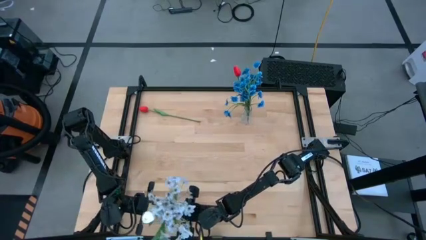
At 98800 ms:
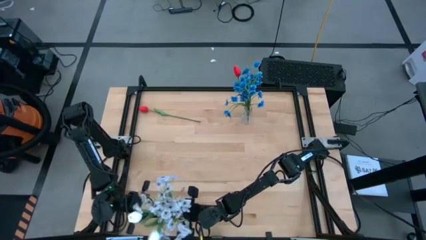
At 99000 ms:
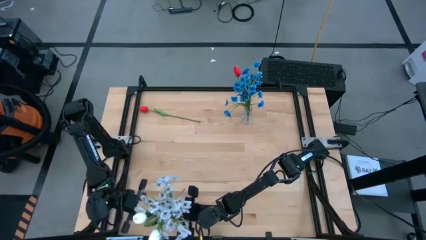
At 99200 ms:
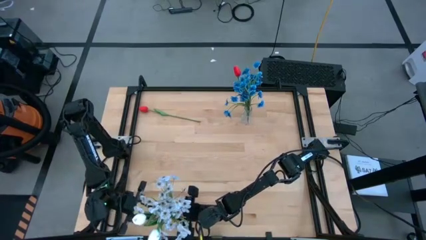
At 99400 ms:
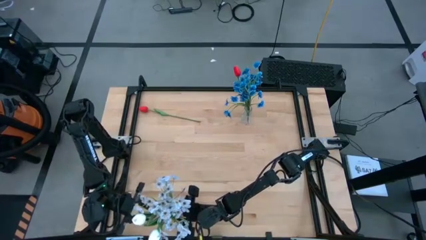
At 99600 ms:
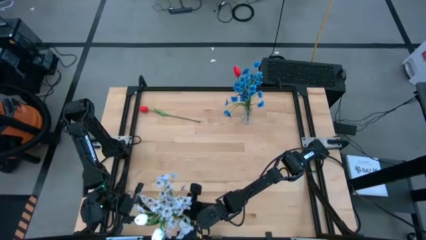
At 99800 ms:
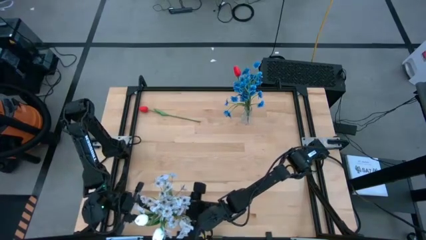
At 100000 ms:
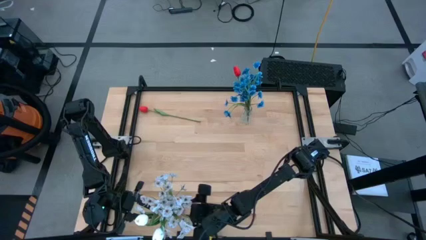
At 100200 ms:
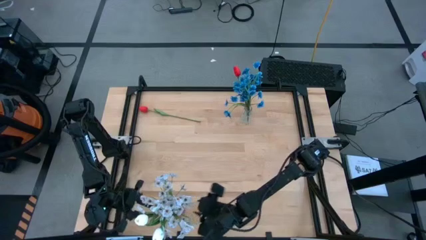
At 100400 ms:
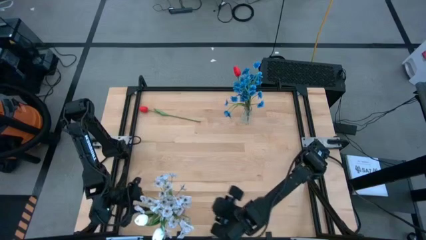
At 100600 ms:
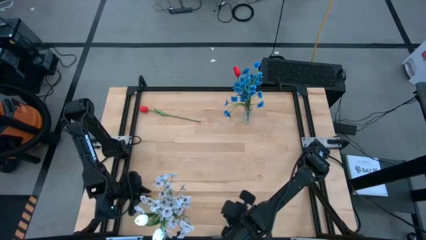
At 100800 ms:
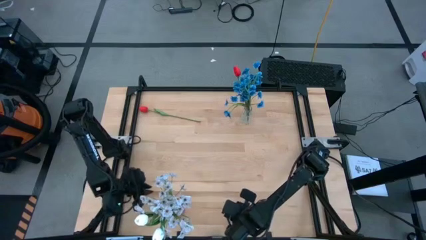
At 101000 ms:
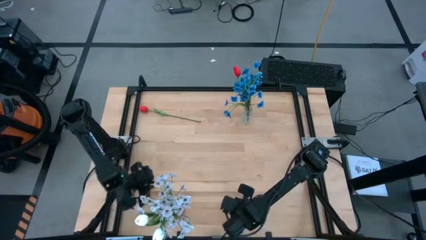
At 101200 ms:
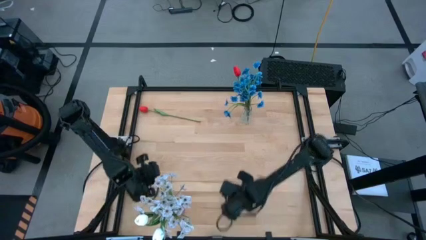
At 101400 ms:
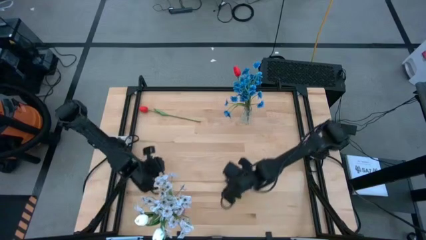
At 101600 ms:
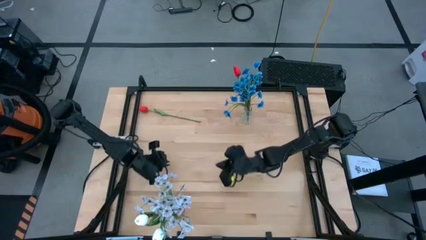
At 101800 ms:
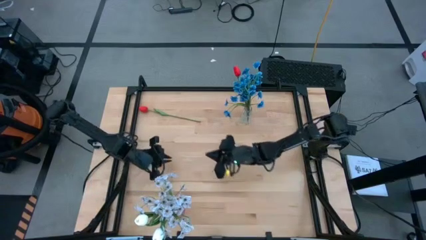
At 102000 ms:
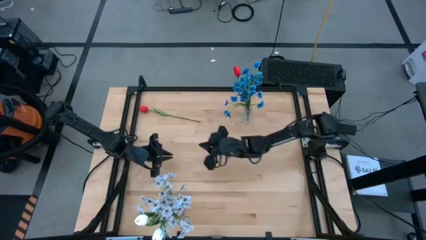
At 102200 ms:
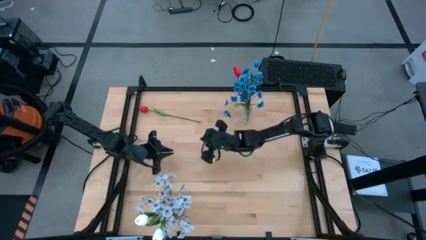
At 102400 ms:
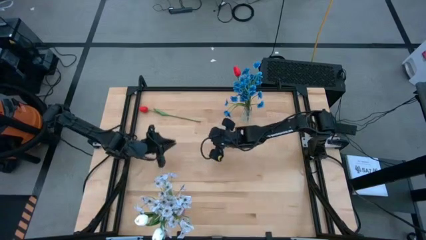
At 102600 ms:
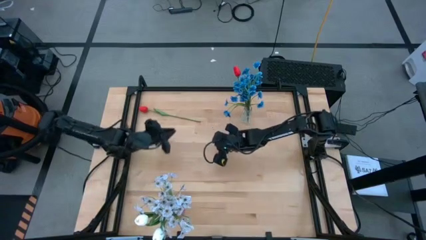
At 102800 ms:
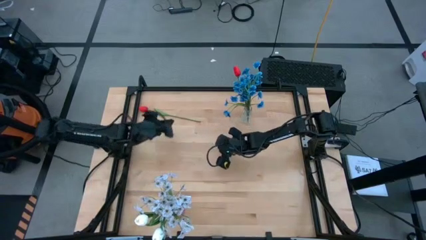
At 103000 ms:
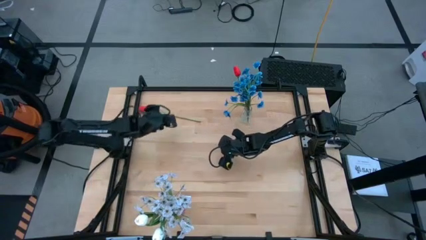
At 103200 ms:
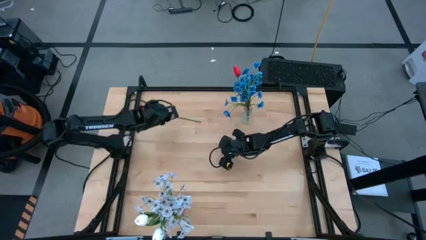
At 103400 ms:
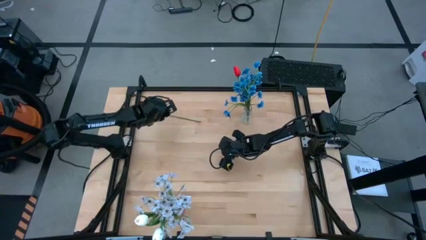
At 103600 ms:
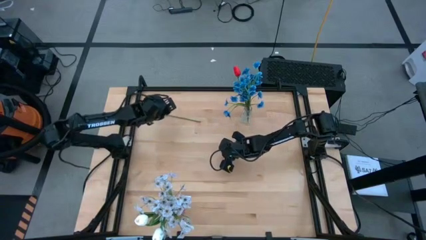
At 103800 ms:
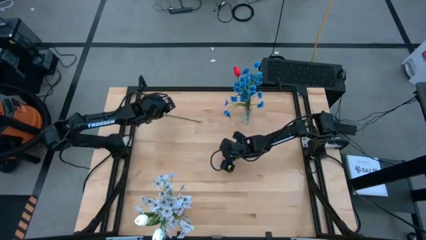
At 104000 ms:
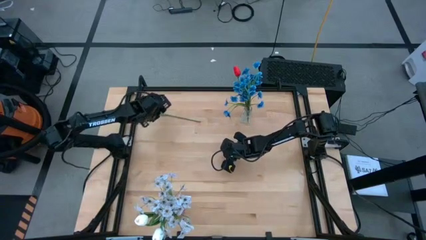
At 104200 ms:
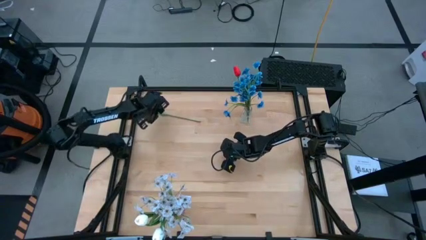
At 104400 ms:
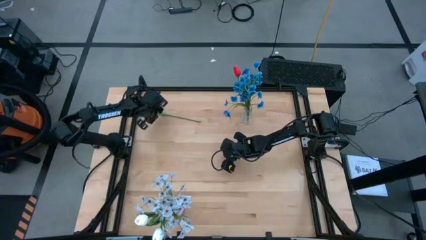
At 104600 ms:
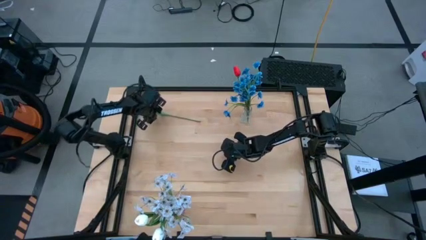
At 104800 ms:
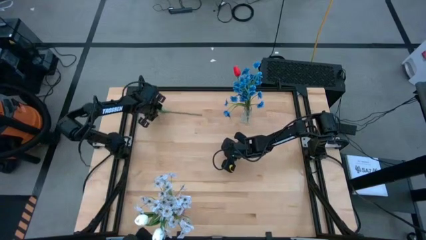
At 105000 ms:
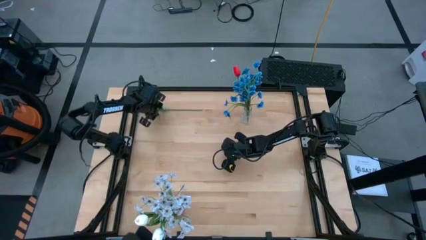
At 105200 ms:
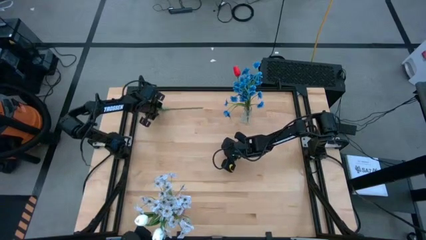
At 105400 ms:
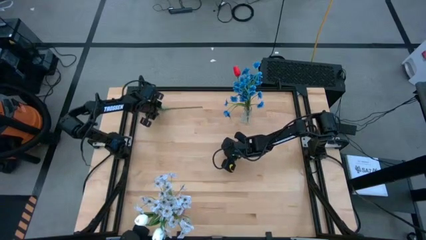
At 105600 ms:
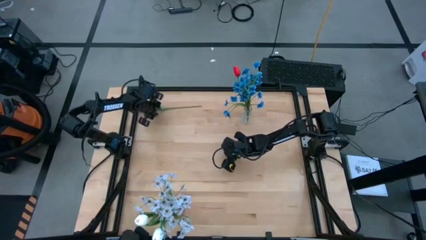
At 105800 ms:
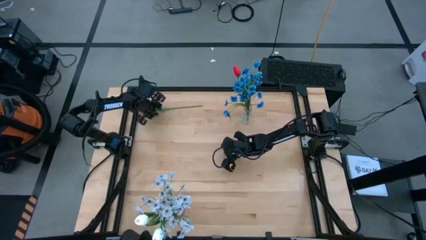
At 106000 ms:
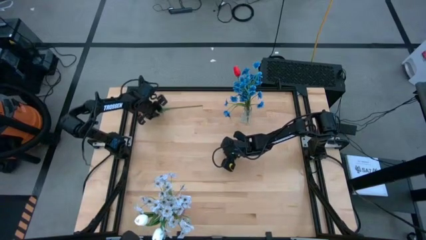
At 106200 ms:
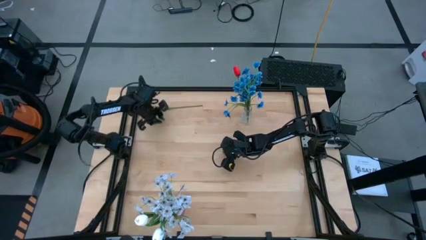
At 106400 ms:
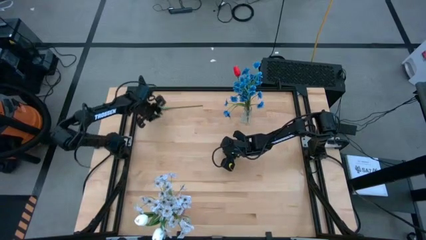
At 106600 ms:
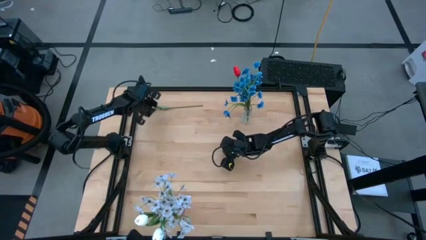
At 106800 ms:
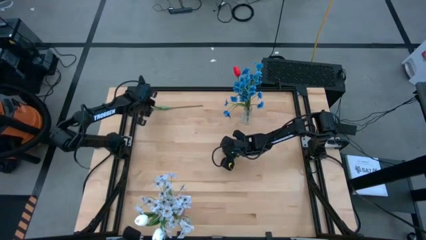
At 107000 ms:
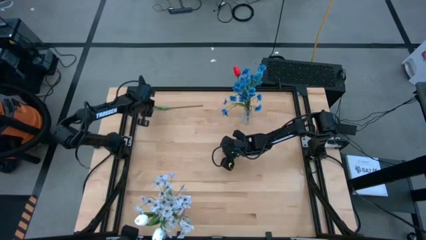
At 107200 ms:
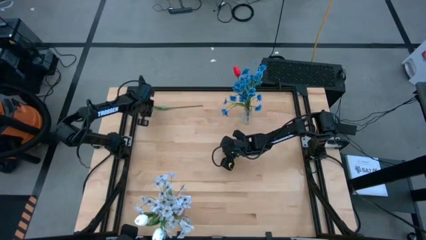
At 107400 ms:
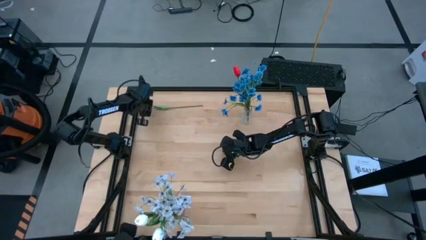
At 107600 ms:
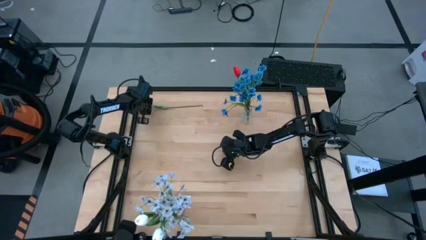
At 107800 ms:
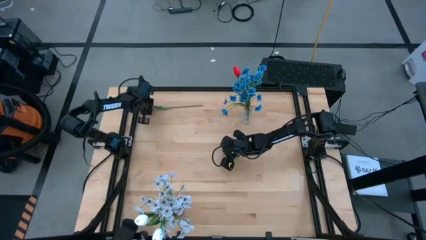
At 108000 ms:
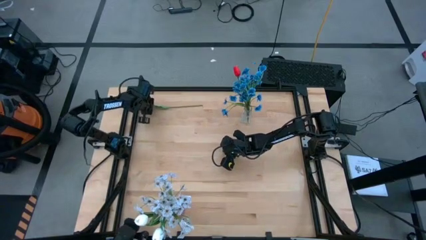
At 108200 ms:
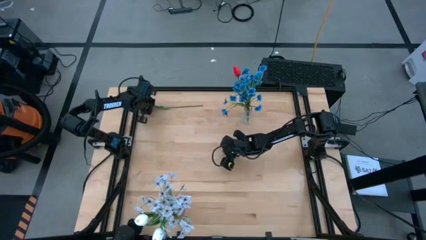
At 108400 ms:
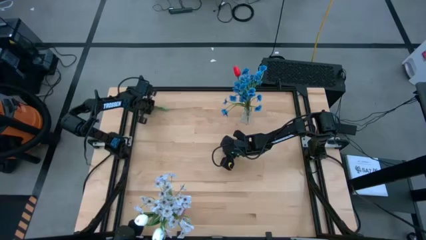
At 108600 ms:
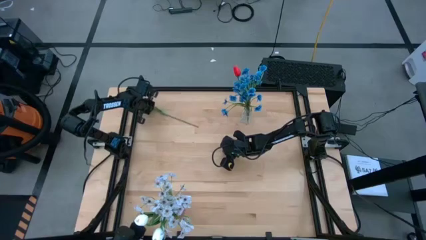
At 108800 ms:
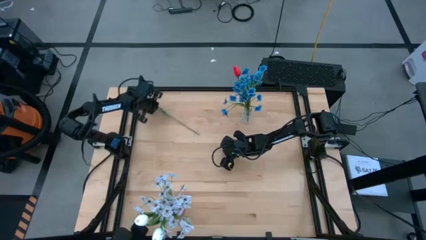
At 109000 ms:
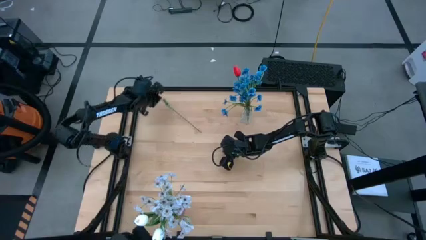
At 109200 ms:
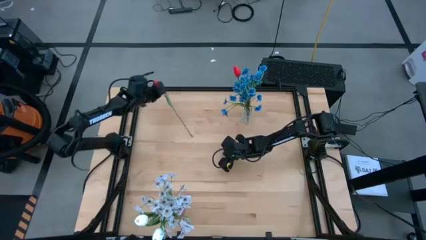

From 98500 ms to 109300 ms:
Task: Sort flowers into vase by color
Put the red flowers into the transparent vase

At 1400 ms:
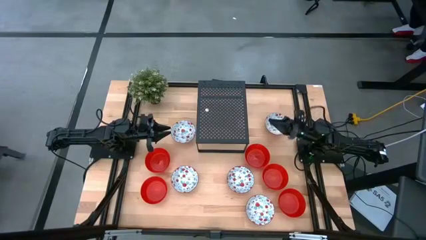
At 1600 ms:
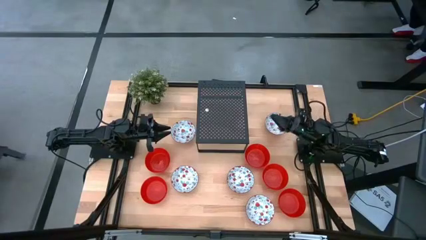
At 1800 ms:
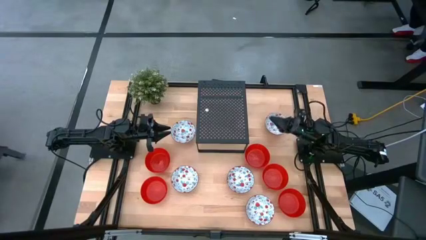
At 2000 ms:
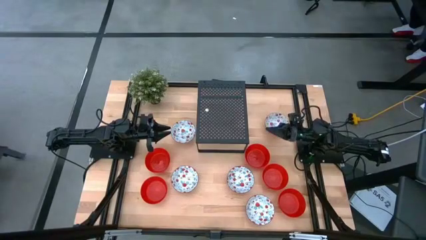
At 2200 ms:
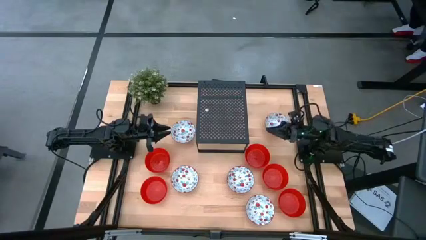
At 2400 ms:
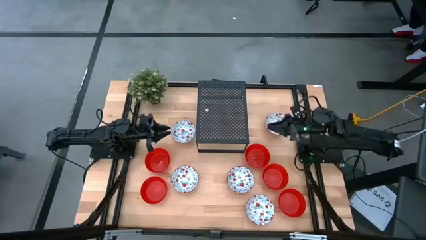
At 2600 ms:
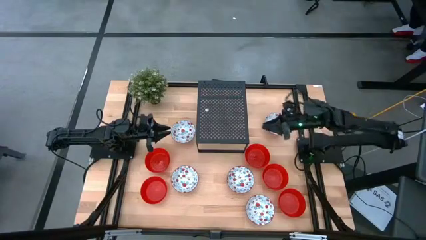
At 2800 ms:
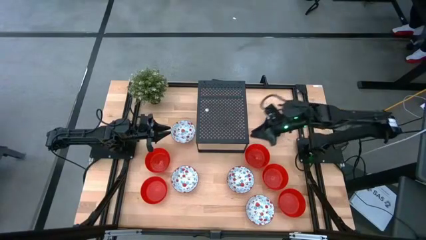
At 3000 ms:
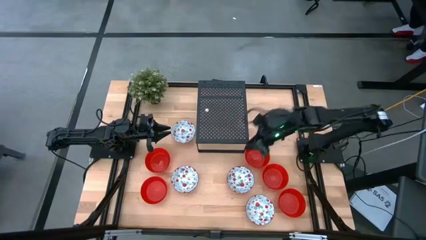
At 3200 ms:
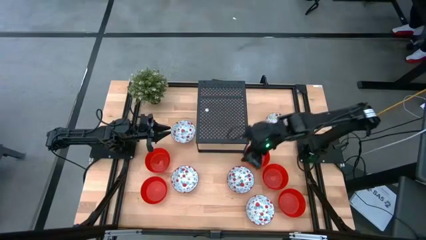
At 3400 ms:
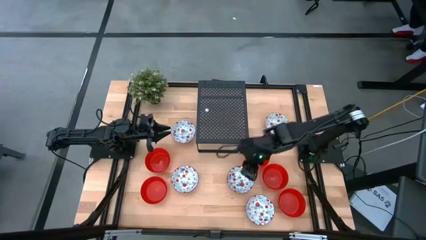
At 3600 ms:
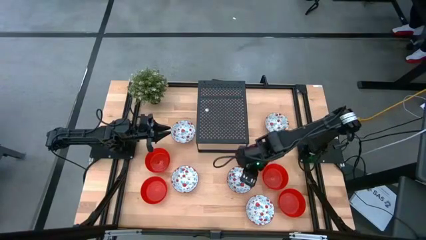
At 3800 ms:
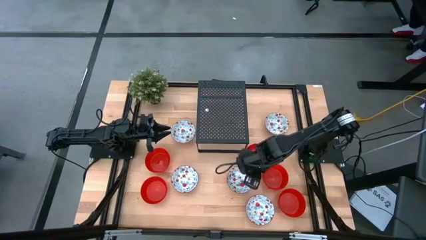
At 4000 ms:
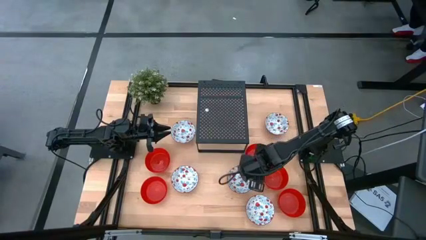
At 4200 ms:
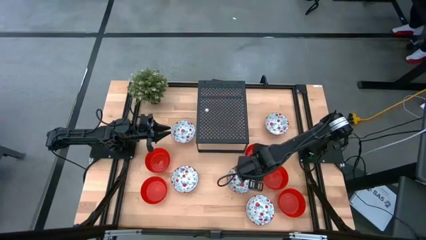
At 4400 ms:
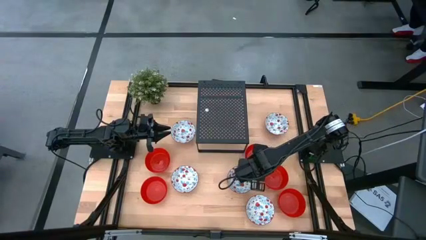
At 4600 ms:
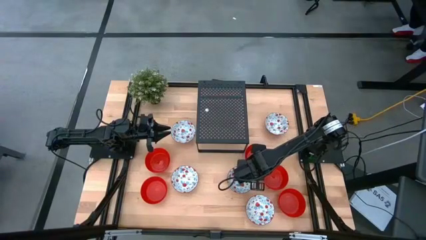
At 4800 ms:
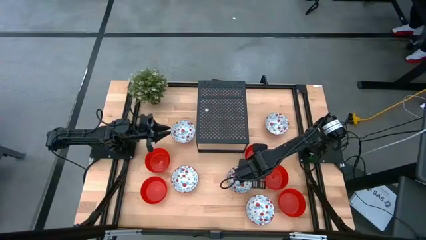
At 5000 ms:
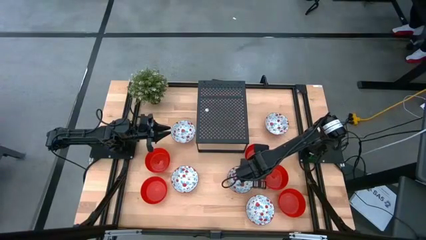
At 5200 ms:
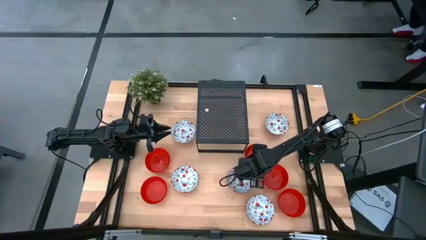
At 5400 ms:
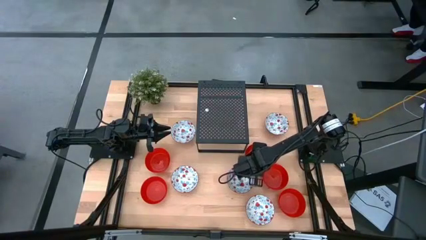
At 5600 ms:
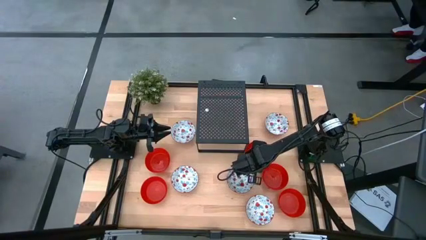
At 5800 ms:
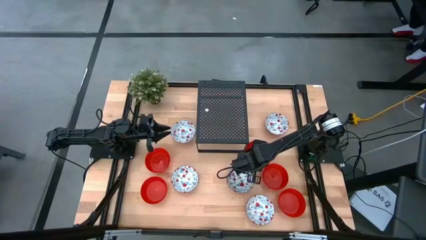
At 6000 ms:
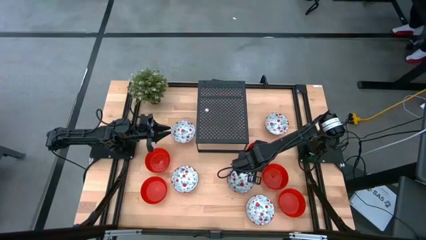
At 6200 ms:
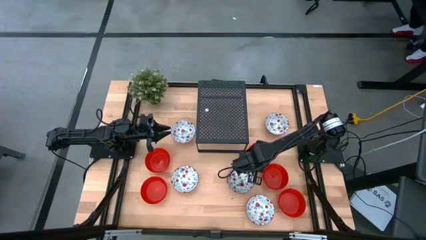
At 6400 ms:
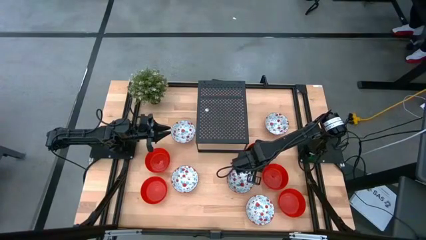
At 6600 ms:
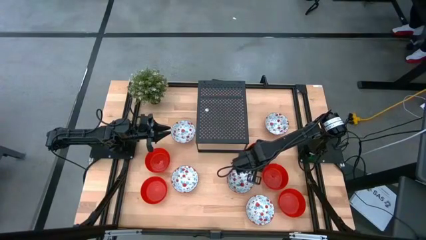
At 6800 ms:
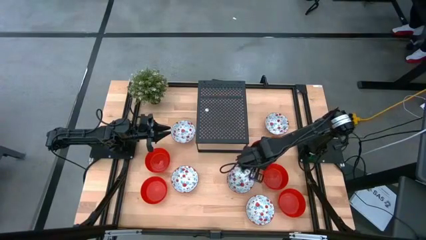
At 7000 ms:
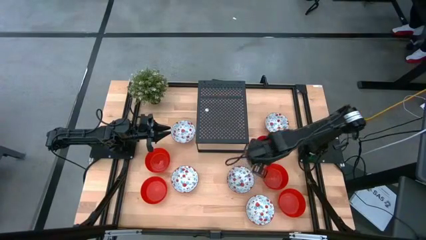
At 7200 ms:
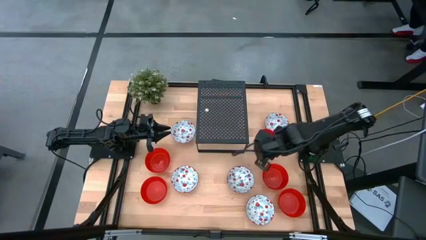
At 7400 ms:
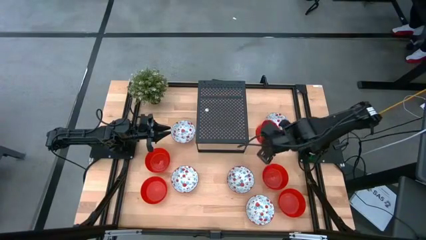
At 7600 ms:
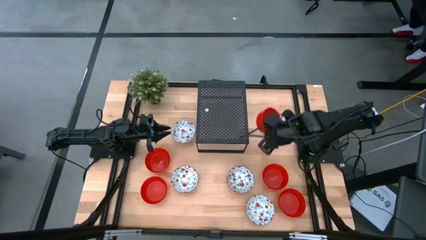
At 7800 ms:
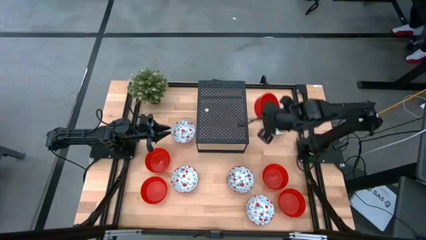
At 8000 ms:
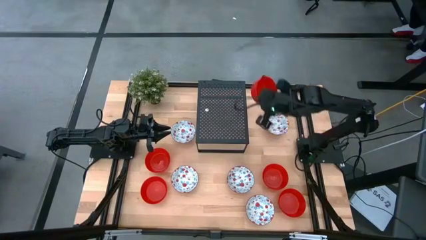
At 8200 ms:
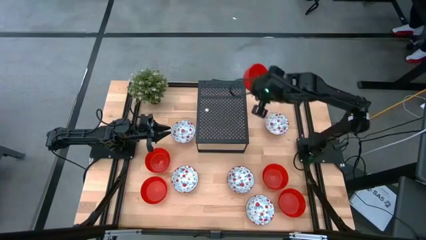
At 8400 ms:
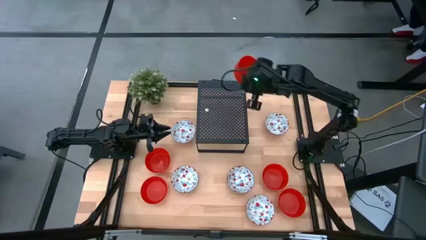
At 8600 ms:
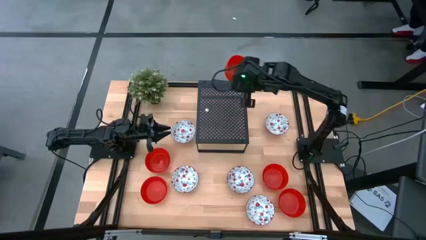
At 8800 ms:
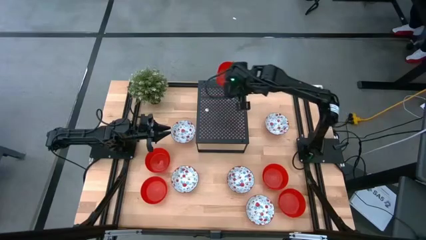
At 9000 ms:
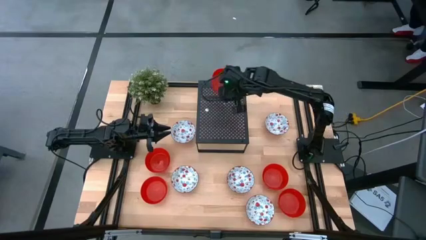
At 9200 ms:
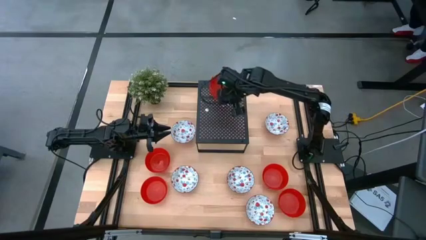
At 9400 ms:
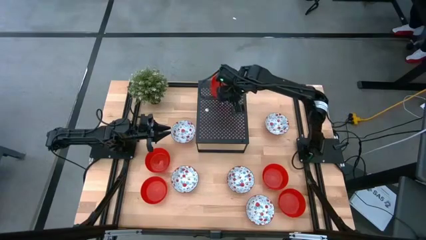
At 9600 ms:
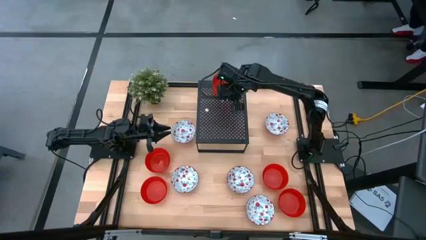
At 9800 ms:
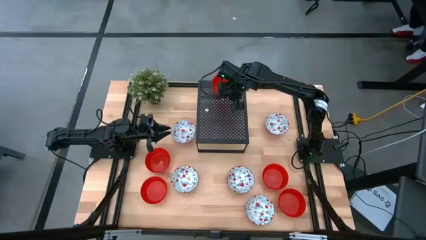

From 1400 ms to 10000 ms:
Task: Pick & Place Mini bowls
Put the red bowl on the shelf
